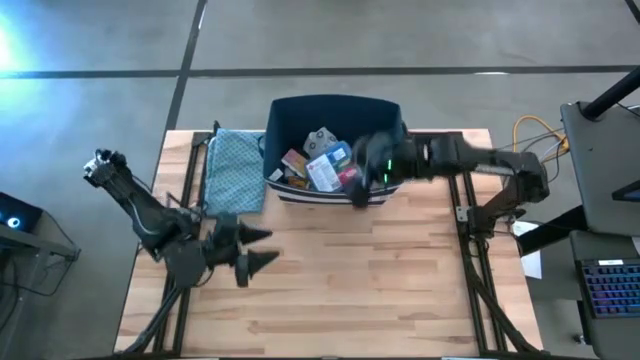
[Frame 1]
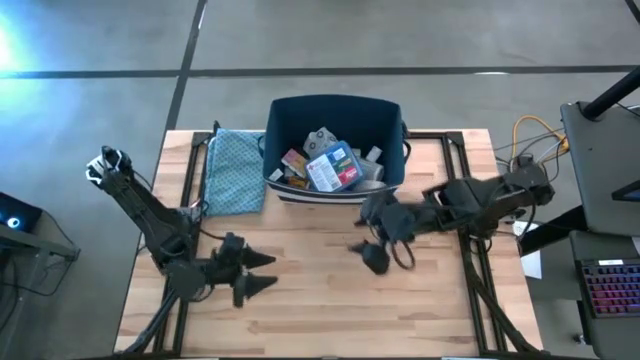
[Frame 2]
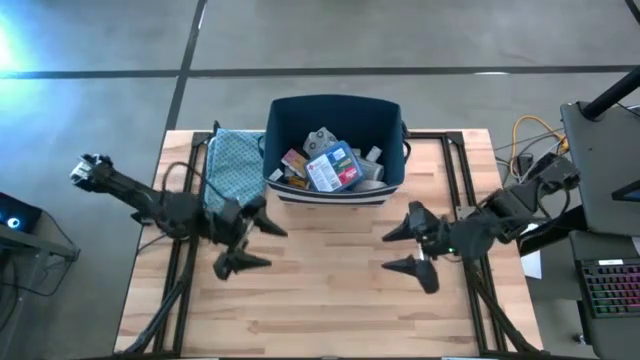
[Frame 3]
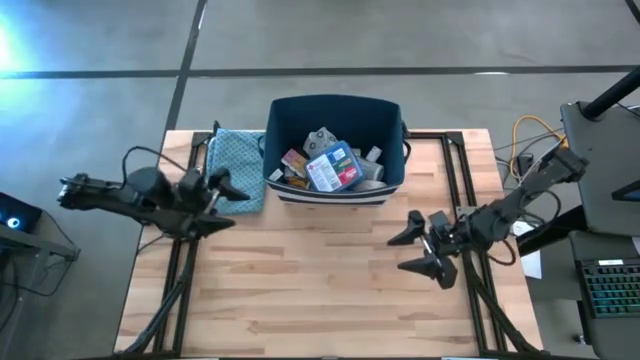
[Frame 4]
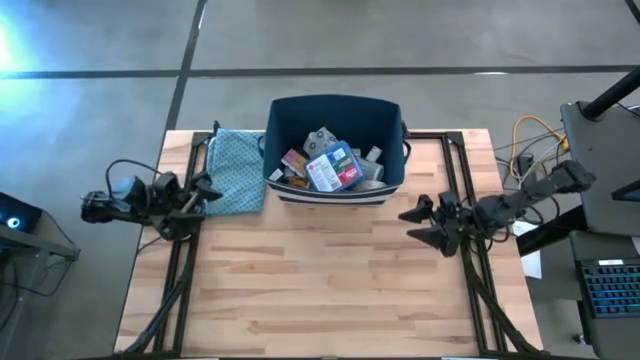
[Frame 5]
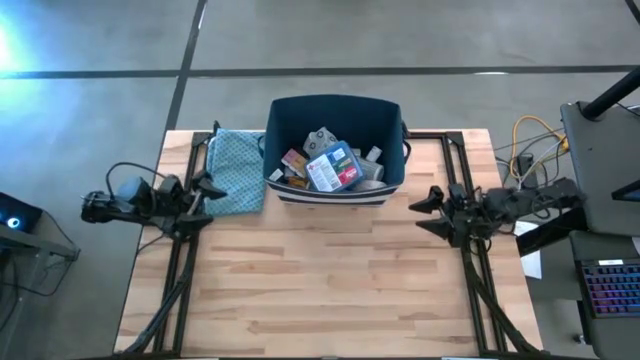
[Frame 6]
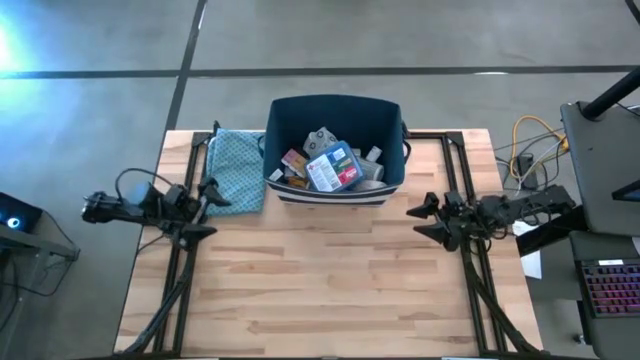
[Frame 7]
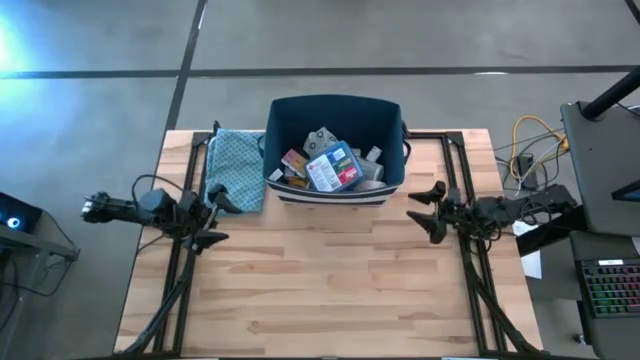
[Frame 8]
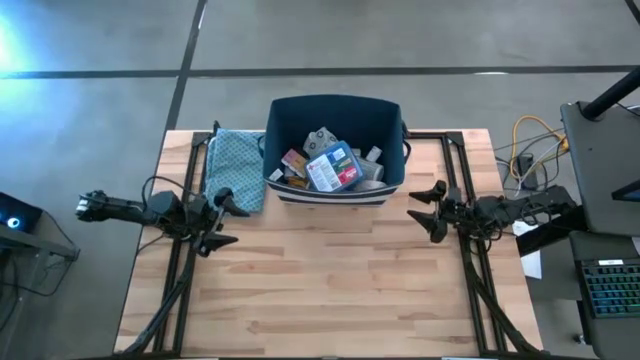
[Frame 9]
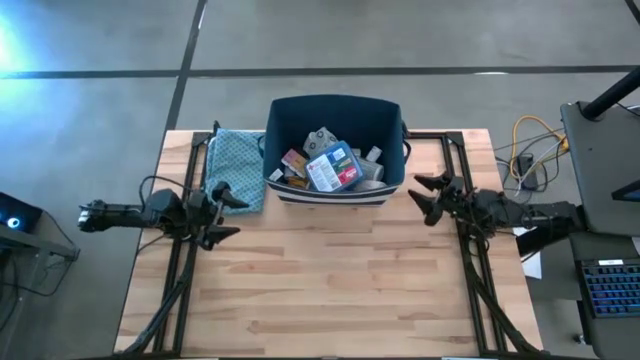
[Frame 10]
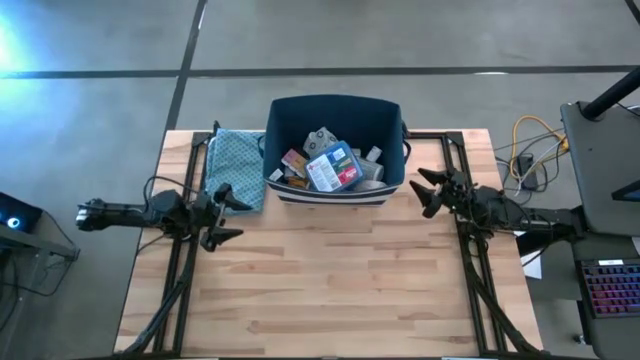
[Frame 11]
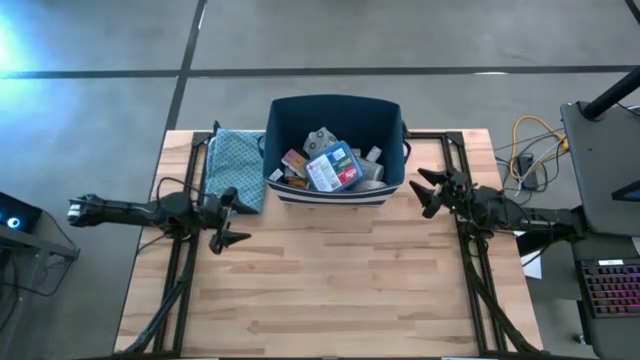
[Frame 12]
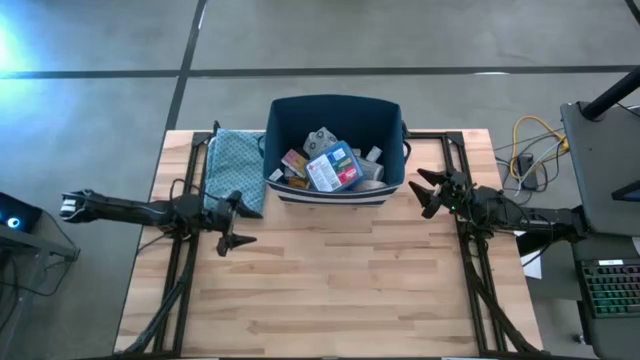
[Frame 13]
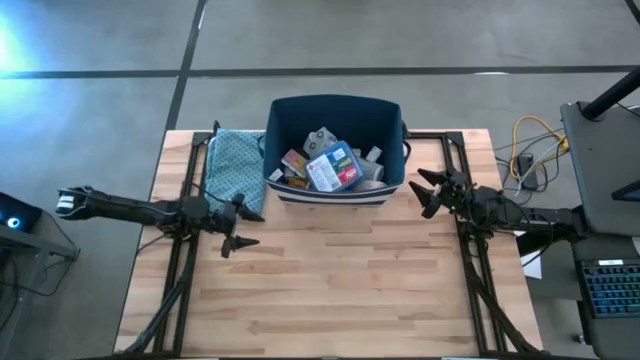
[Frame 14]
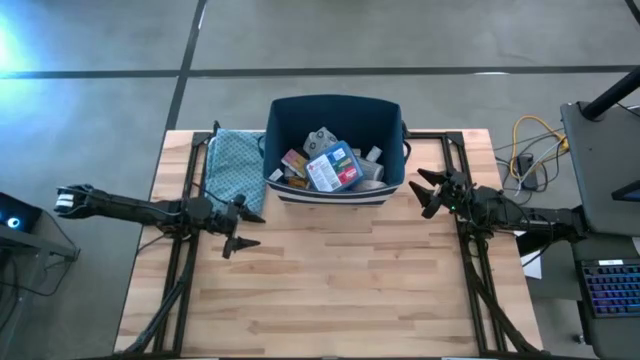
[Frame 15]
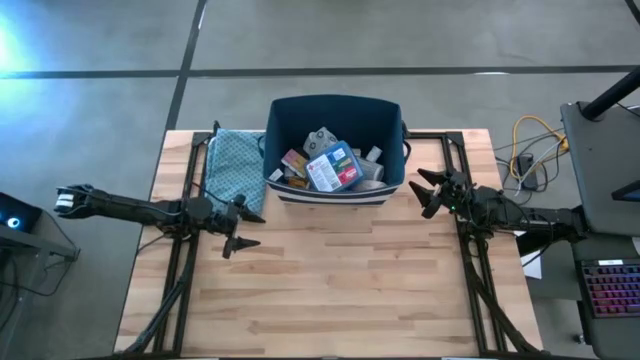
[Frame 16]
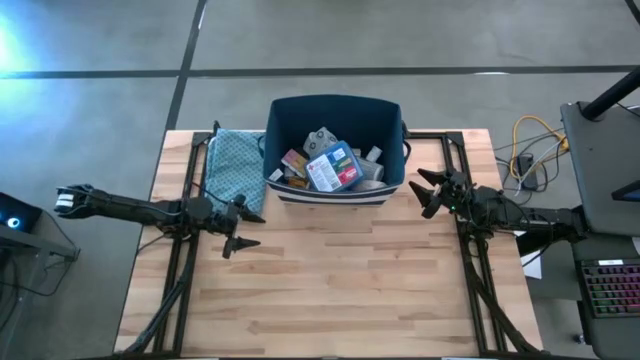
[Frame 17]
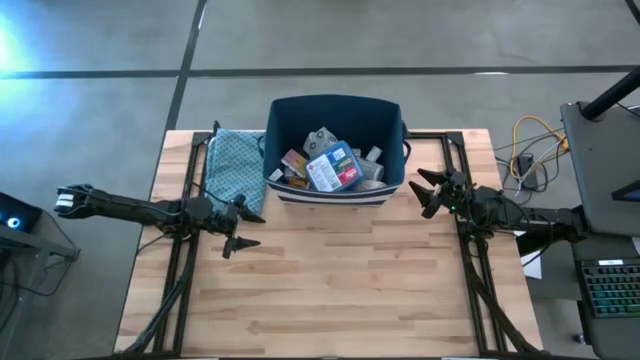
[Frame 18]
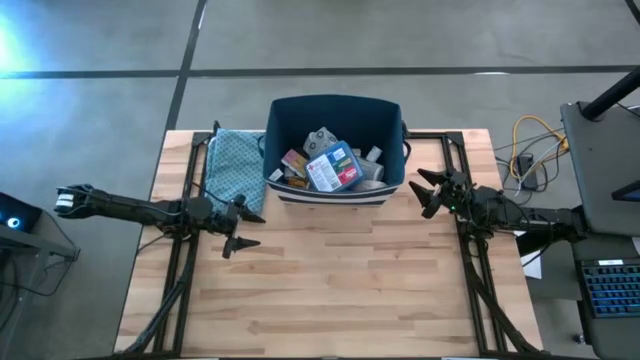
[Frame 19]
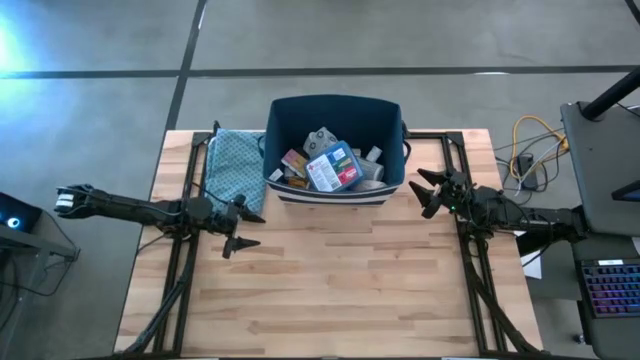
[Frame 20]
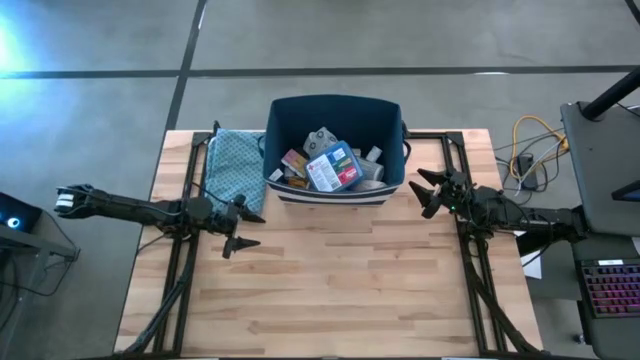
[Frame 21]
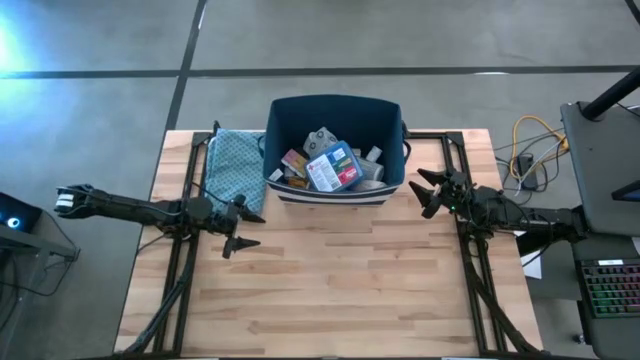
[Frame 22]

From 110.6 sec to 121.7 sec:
Task: Pick & place medical supplies in basket/bin
Return to Home Position

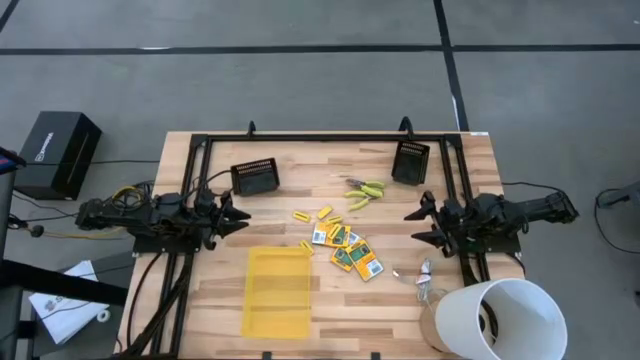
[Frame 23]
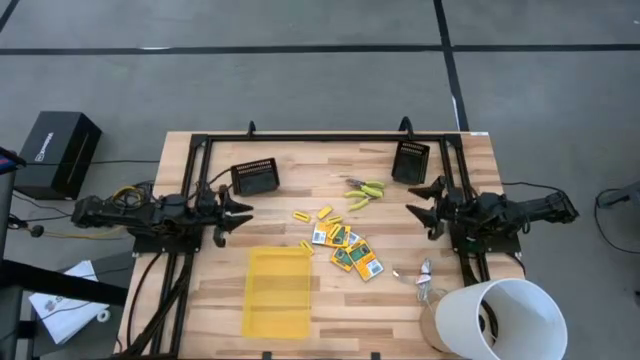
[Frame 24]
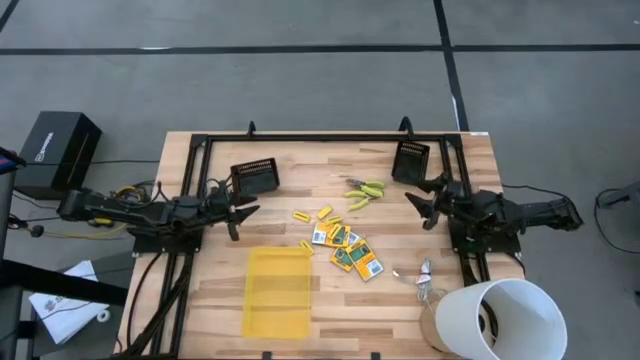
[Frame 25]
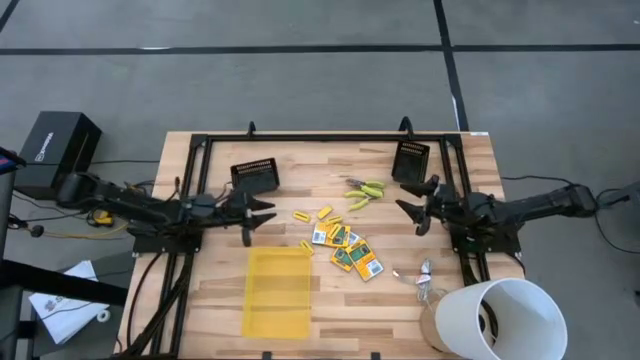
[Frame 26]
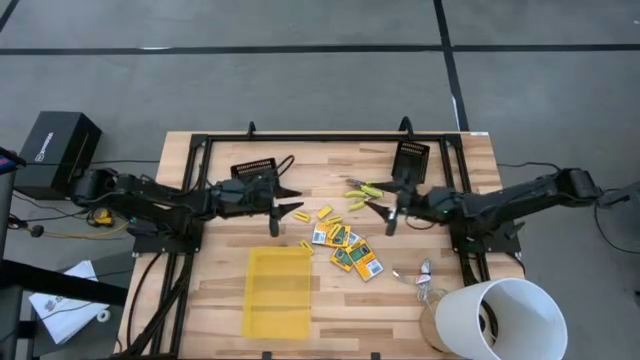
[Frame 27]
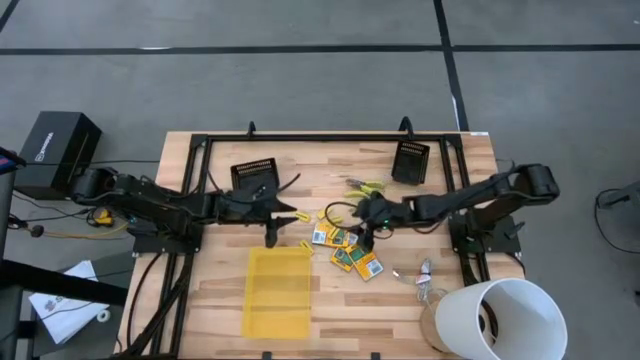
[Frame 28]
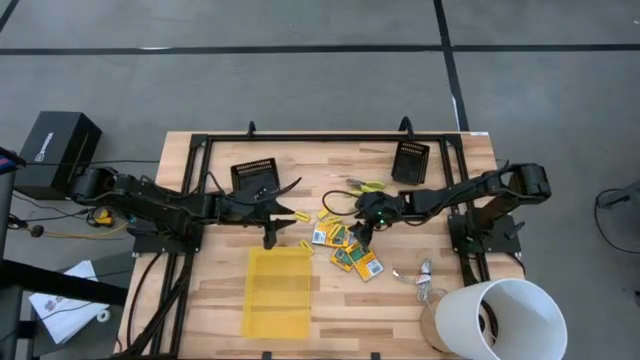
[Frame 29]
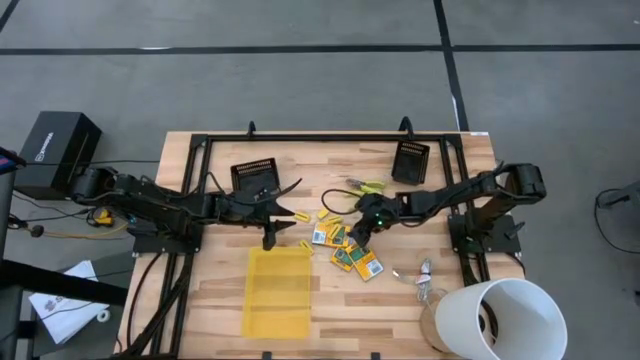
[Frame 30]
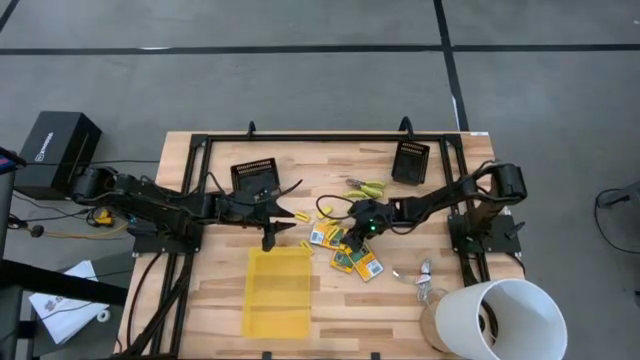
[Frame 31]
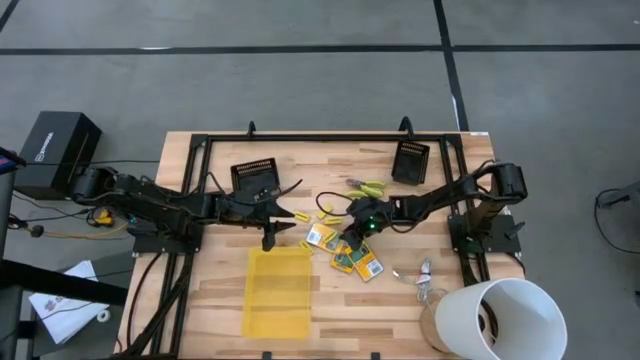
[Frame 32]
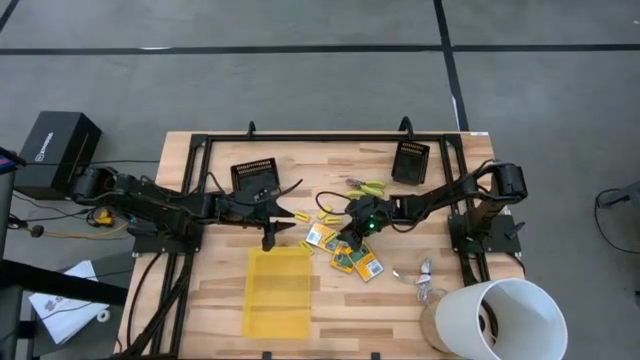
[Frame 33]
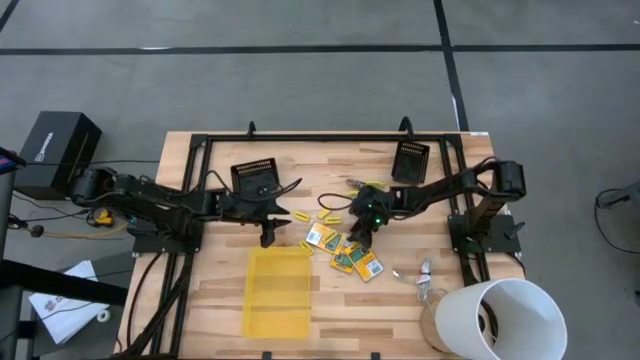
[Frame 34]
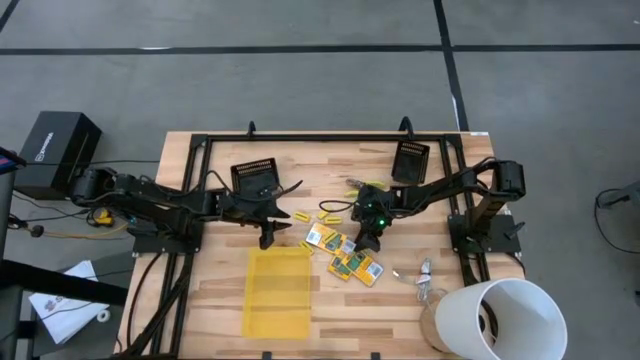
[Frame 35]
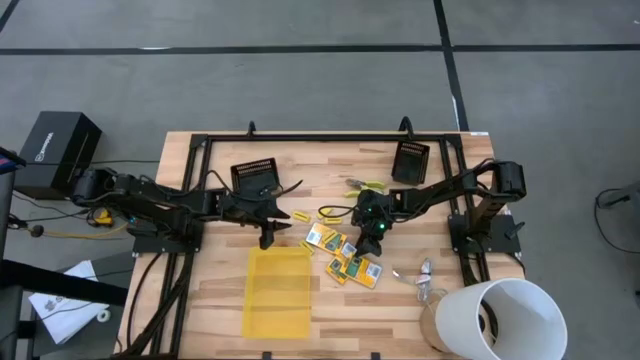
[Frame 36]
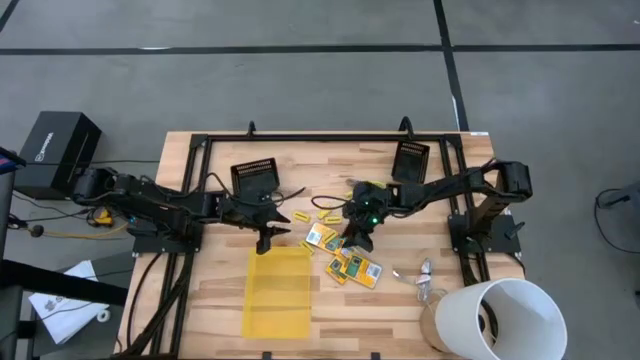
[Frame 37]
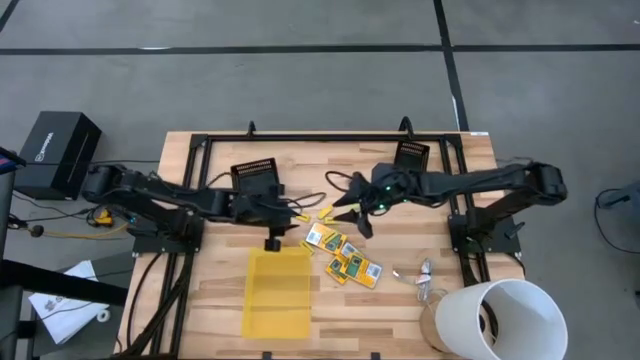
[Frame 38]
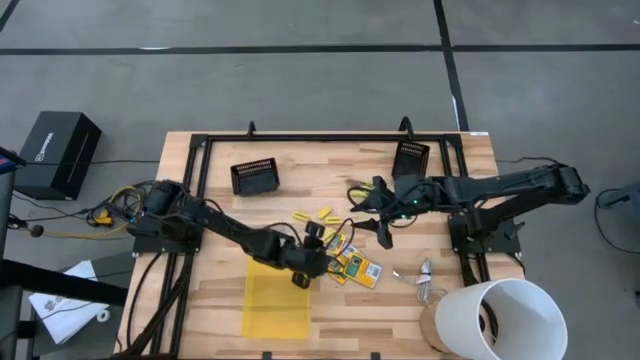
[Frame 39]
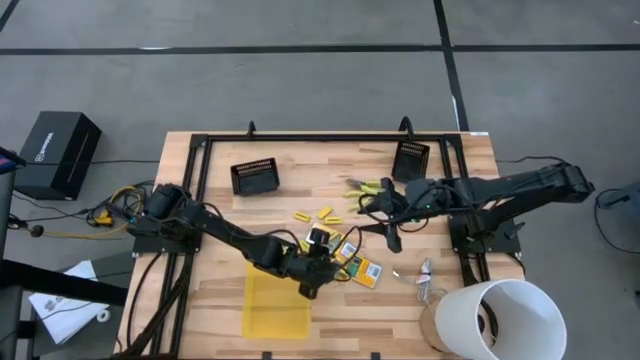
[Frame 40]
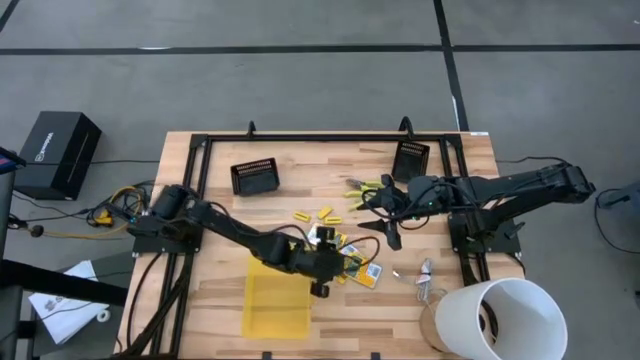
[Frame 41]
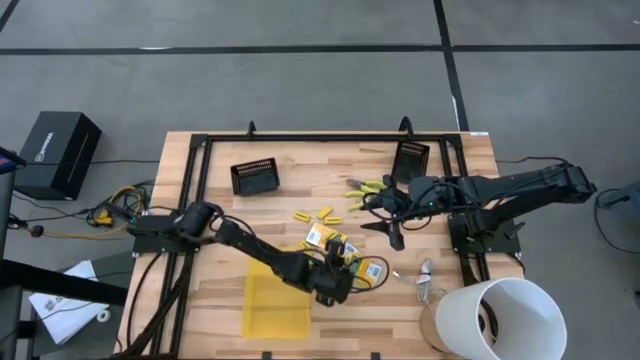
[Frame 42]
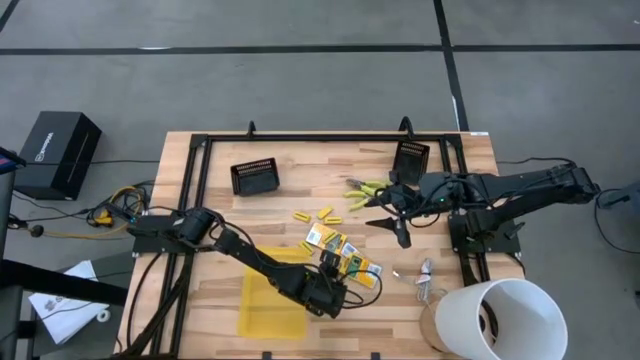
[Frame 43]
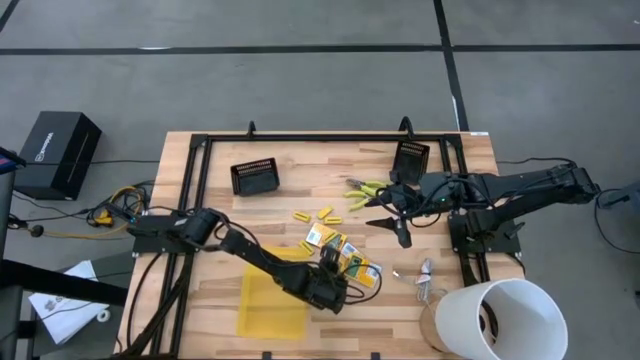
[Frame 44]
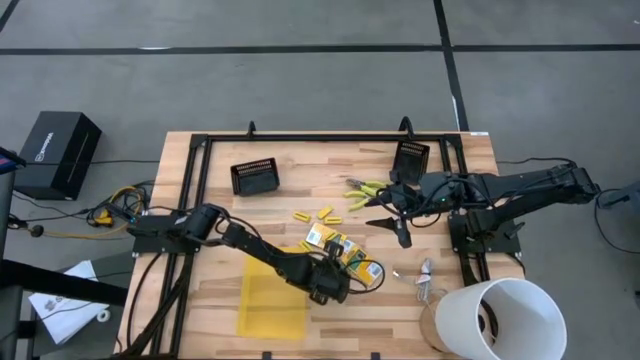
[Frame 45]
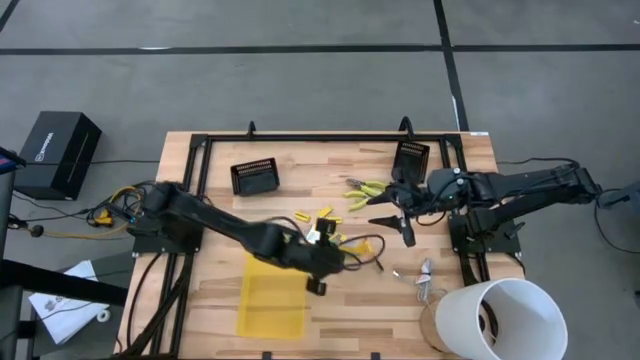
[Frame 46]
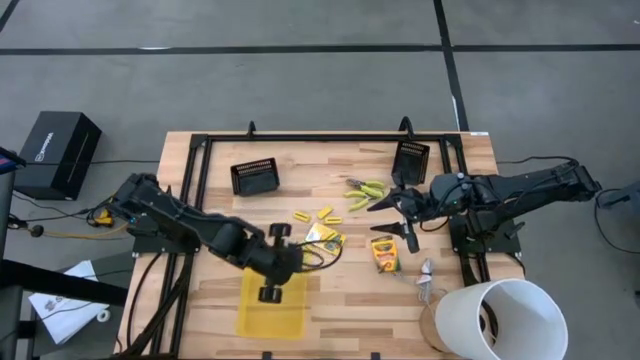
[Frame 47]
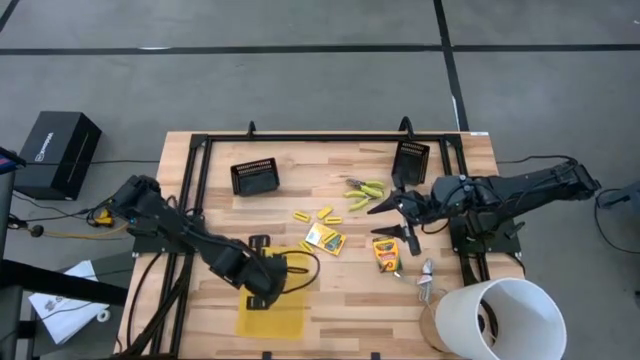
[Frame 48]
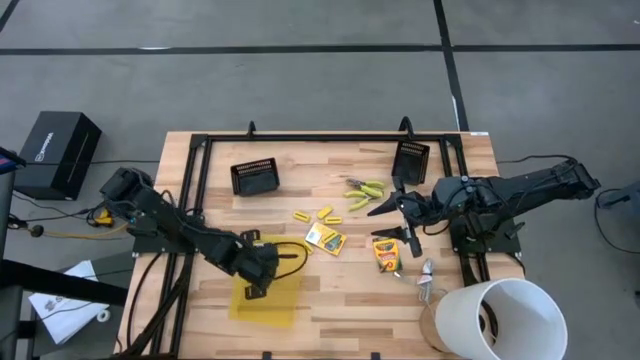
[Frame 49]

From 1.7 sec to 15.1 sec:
Task: Pick & Place School Supplies
Put the yellow crayon box into the yellow bin
